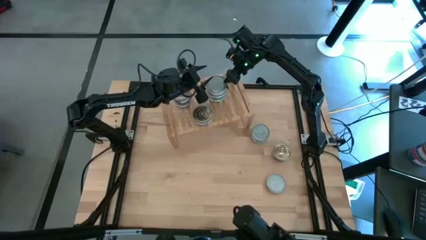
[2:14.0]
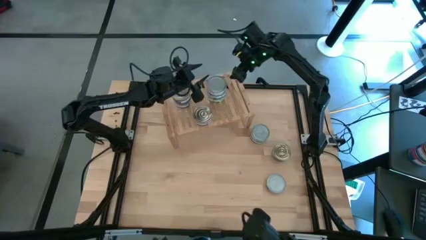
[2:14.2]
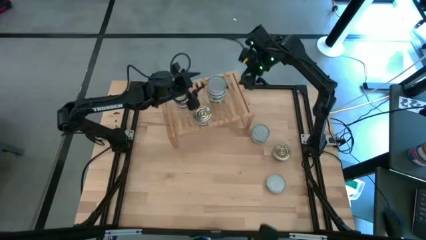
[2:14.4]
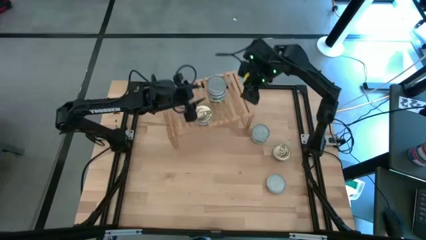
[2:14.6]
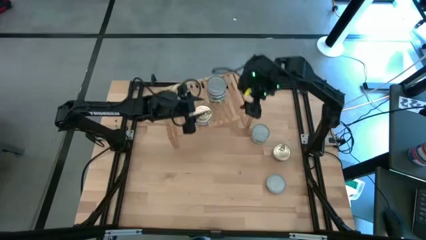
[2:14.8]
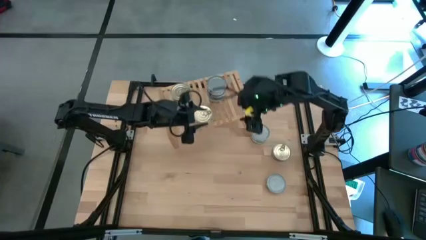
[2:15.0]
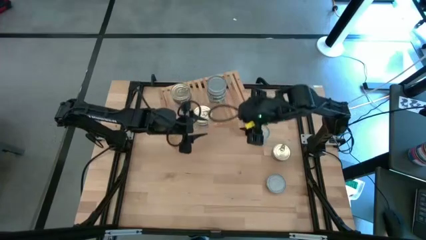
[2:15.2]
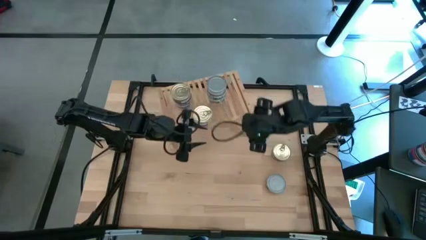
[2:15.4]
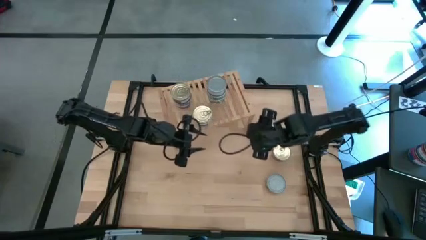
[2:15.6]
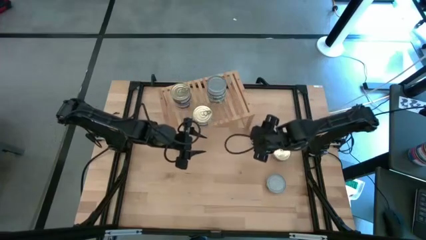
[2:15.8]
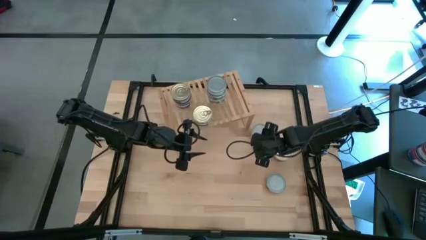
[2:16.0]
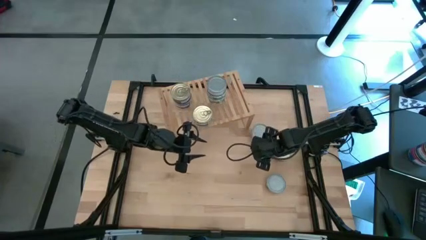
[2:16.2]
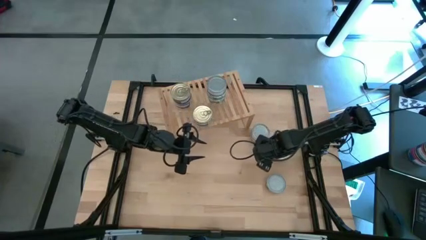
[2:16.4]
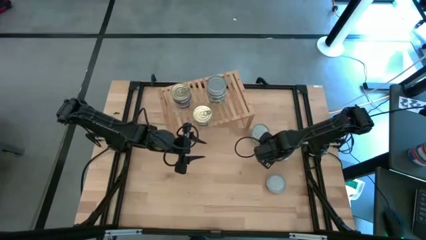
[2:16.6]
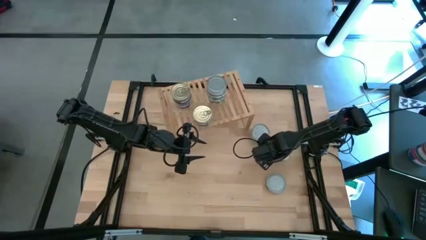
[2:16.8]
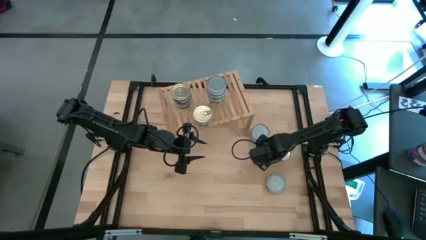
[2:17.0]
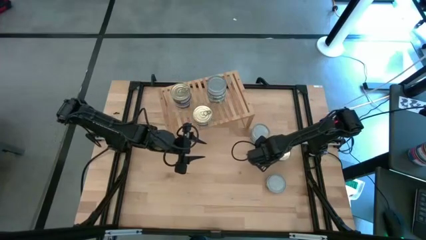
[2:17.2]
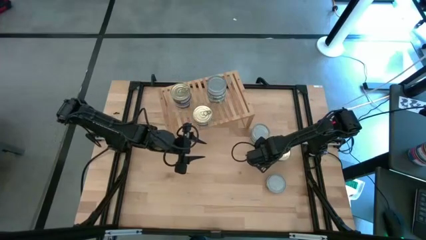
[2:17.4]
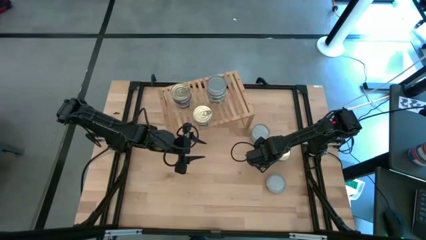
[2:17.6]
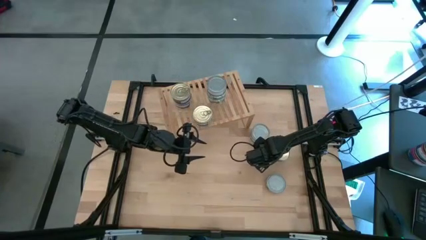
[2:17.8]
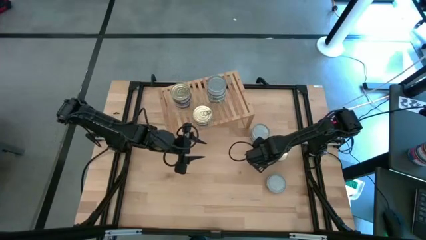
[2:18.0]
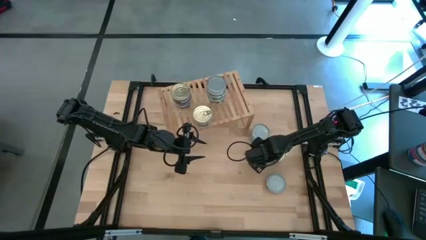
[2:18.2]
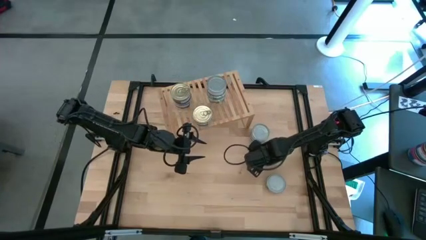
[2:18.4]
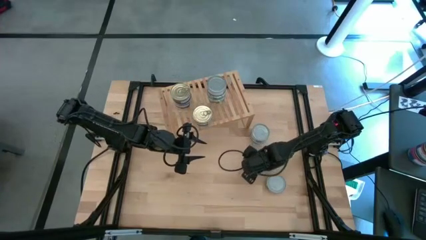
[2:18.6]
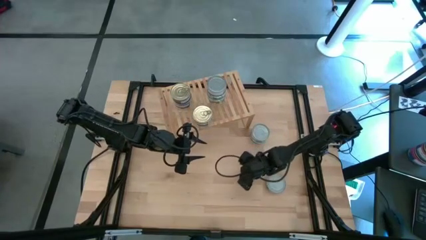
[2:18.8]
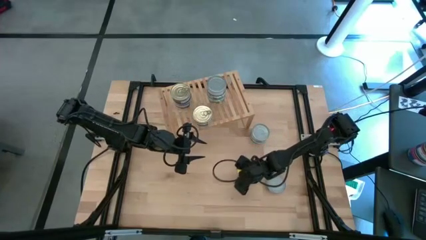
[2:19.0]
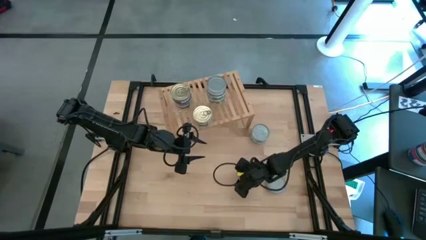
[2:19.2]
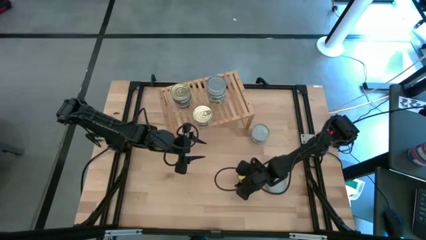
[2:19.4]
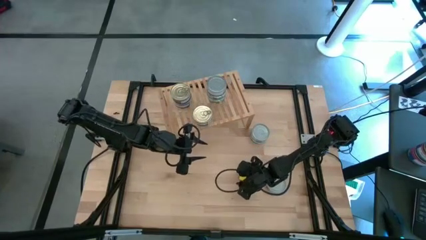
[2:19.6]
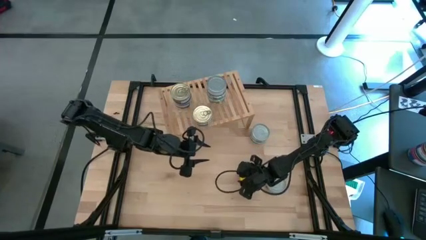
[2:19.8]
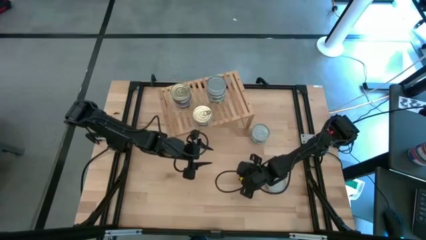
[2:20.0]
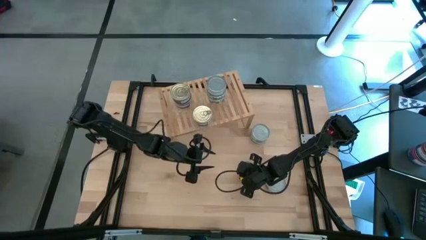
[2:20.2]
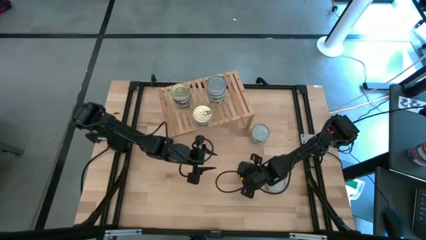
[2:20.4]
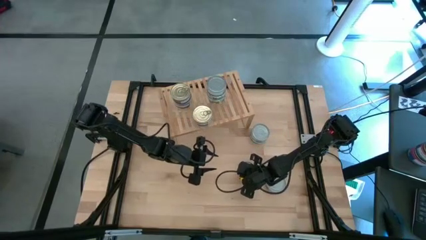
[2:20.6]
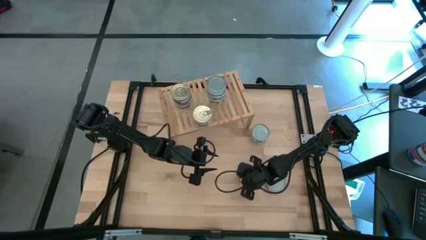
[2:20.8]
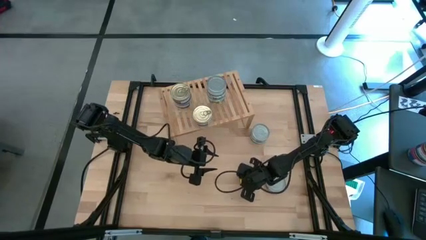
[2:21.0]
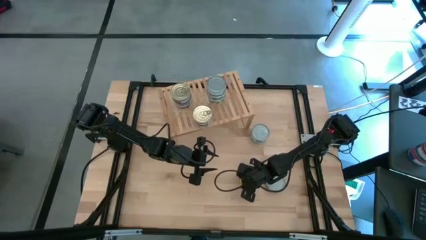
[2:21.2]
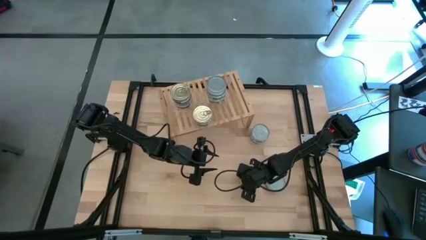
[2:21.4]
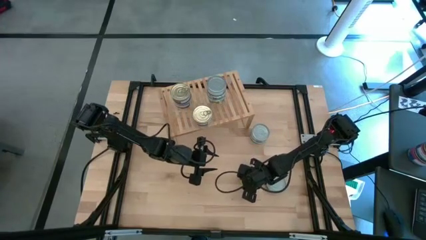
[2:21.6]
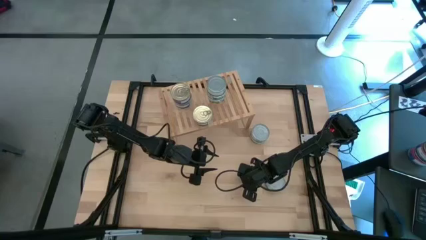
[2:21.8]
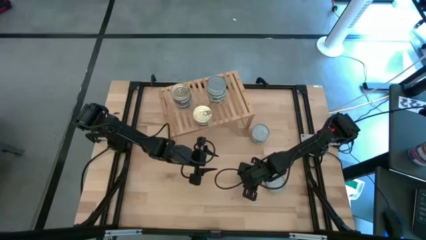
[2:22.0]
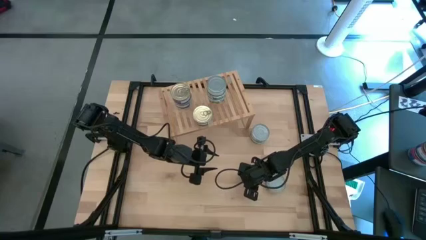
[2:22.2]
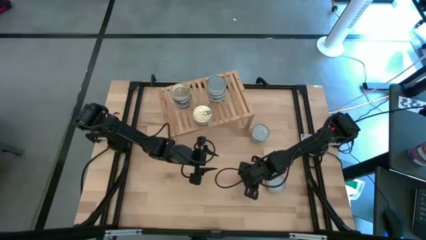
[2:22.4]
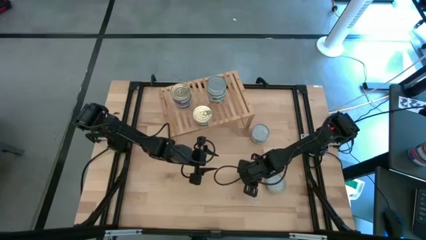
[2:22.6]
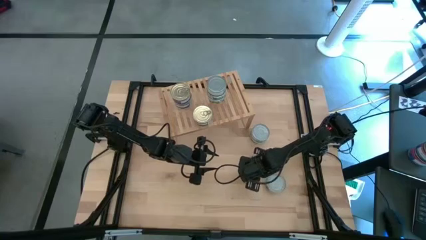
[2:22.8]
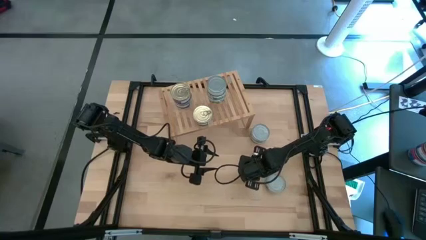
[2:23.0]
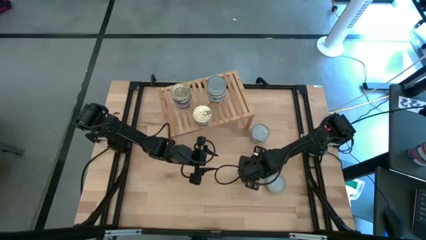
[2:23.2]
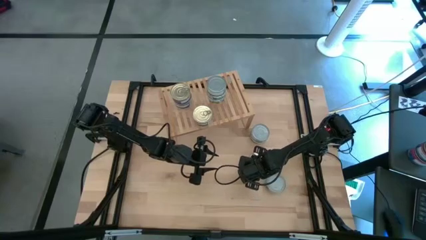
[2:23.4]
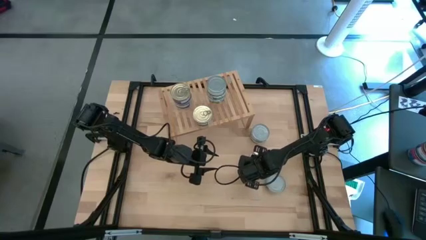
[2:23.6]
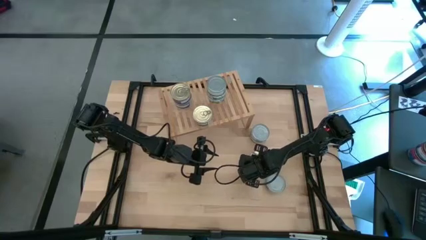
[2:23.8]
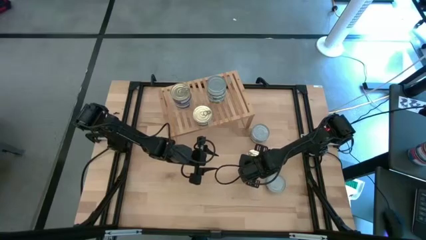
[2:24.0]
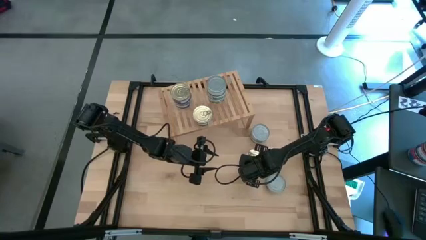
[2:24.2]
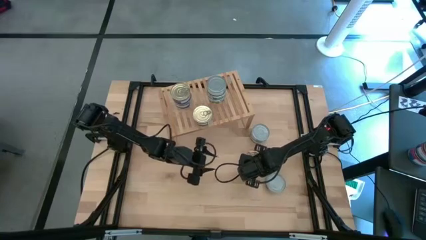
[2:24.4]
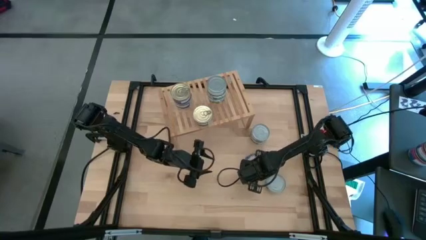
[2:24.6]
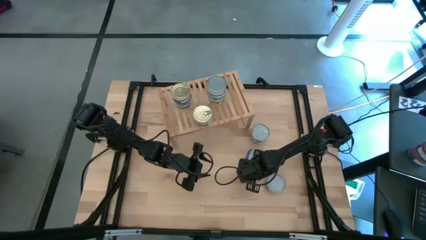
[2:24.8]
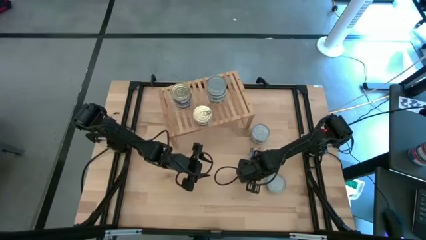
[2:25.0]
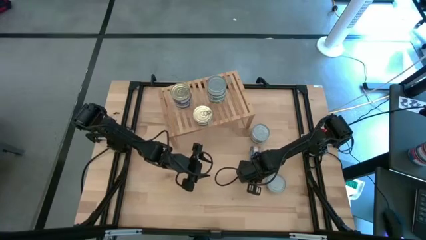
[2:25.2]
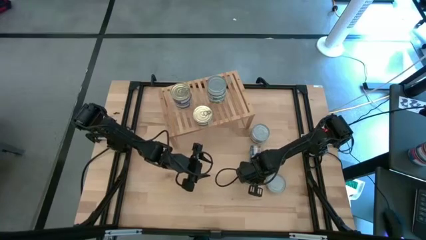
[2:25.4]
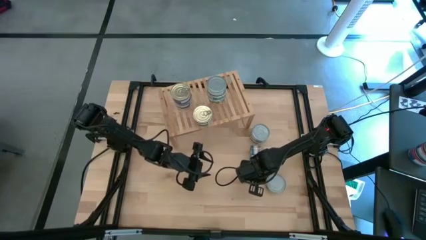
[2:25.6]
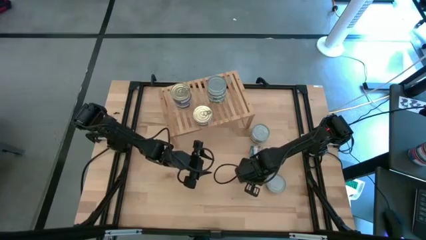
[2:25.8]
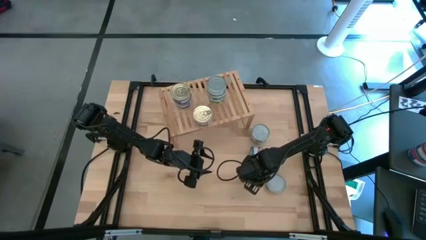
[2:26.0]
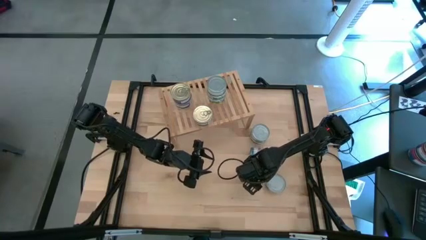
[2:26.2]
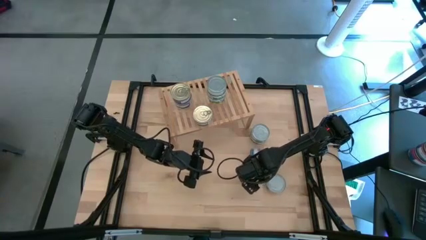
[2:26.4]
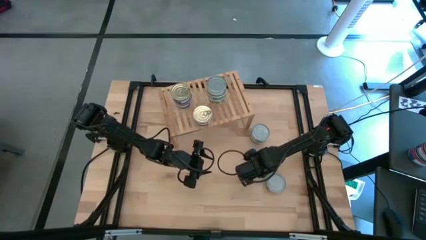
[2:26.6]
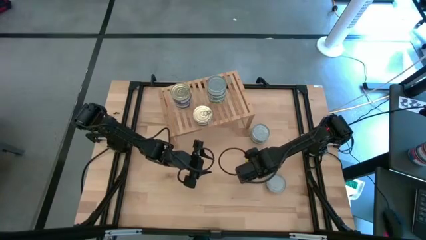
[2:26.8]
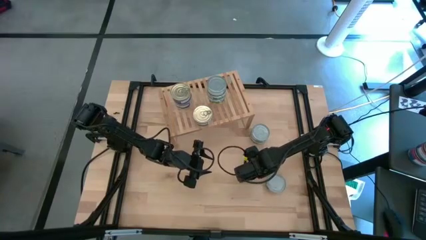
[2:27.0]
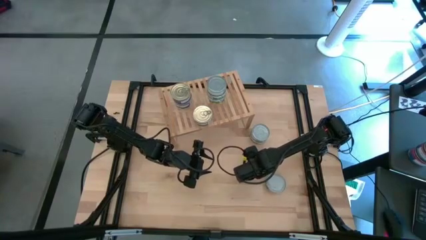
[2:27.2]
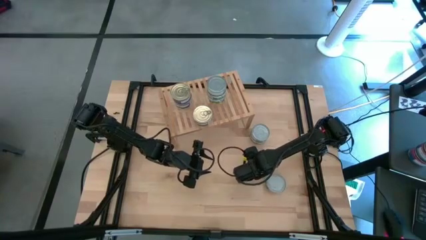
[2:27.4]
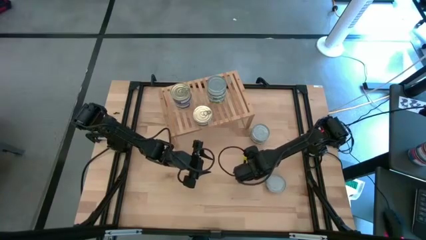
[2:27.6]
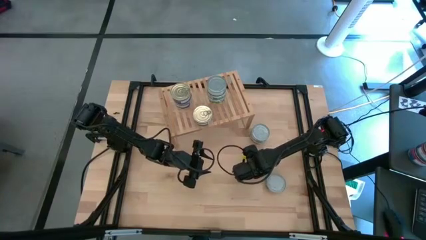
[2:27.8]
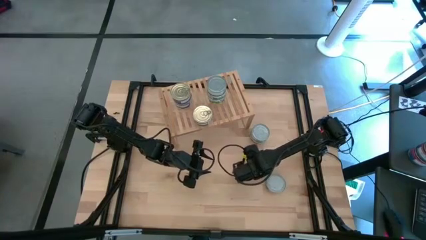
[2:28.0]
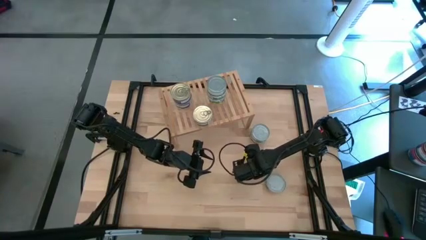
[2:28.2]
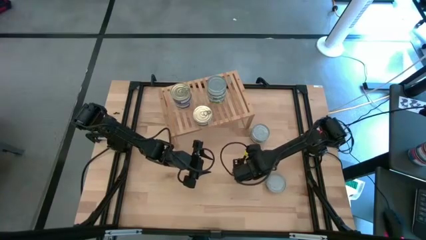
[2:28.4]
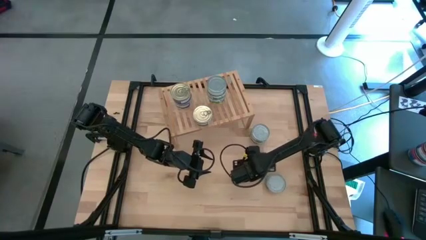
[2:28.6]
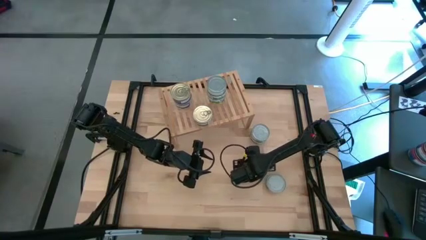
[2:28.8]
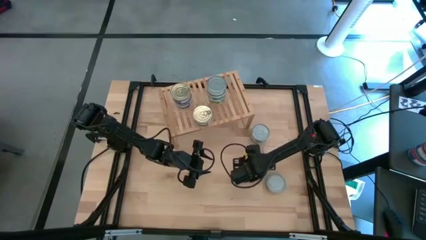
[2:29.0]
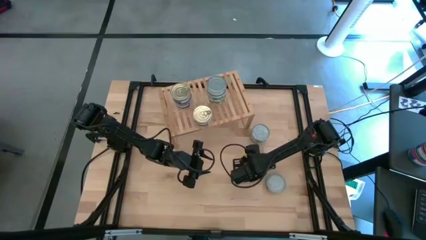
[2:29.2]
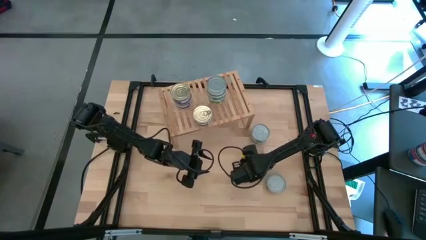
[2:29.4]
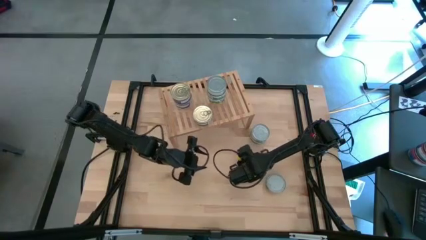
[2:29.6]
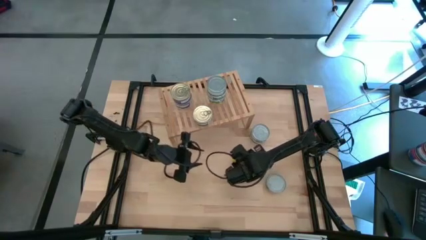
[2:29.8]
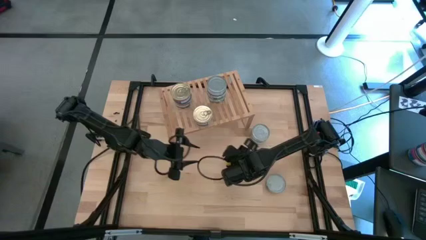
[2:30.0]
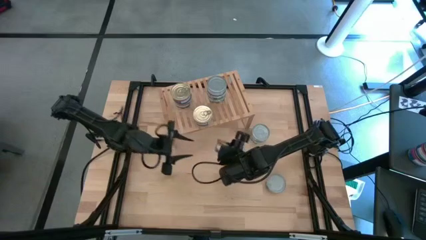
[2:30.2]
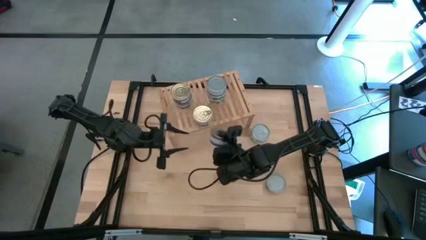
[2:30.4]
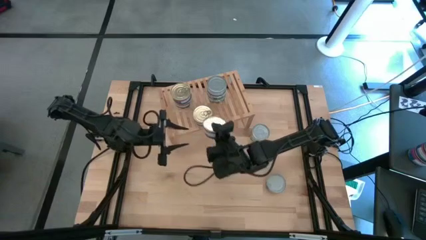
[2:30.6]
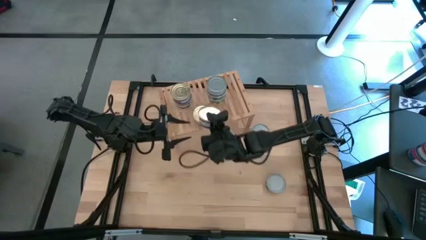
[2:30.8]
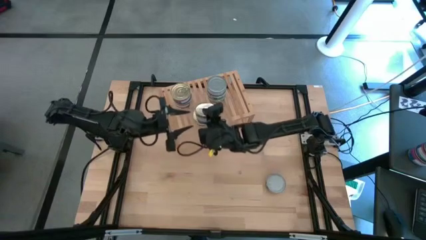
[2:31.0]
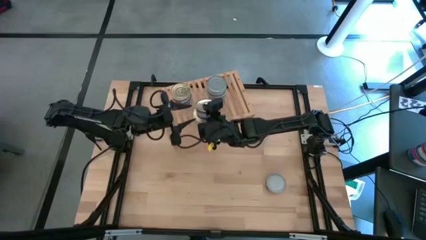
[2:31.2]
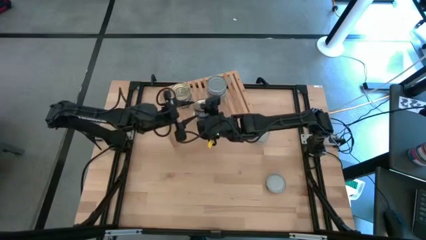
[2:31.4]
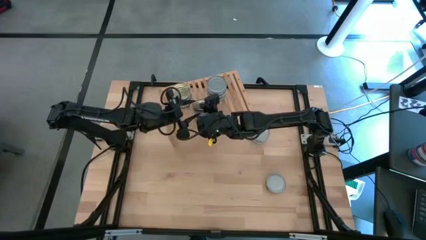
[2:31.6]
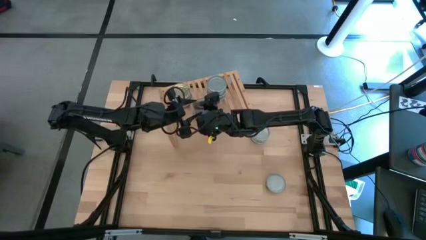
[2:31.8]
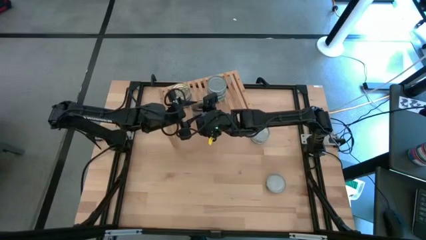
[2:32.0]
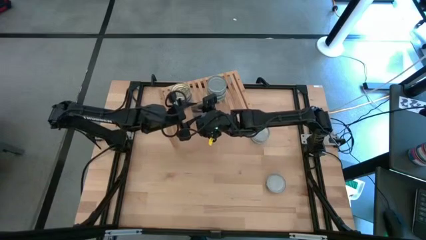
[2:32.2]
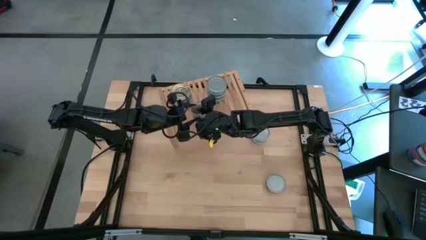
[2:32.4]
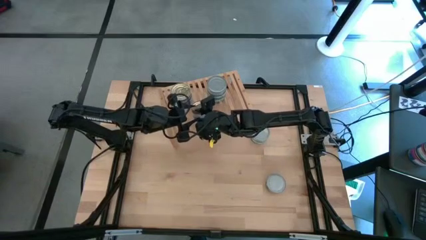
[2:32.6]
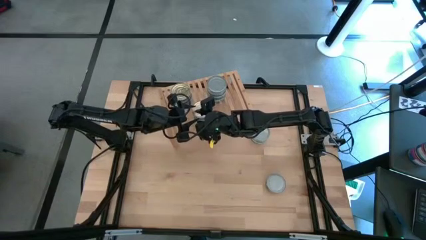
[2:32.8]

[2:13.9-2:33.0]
Task: Stack canned seafood by type on shelf
Stack the blue tuna can on top of the blue tuna can on the shelf
